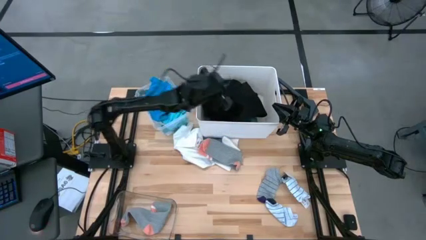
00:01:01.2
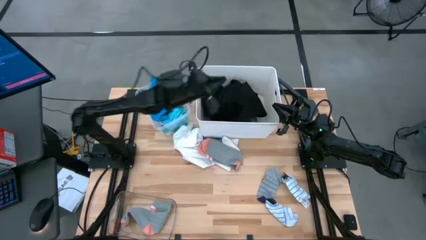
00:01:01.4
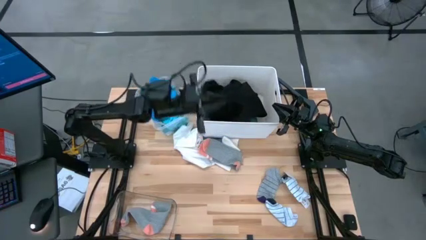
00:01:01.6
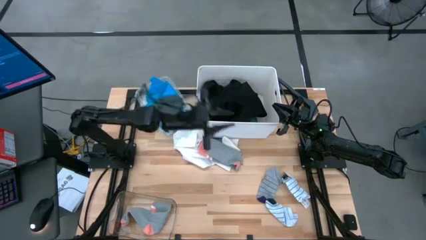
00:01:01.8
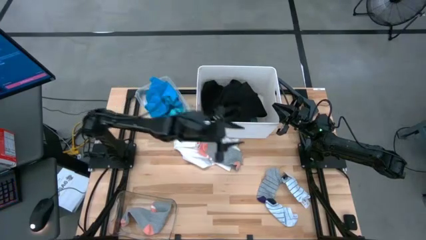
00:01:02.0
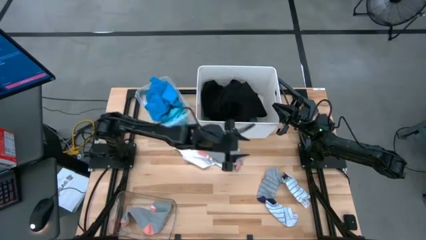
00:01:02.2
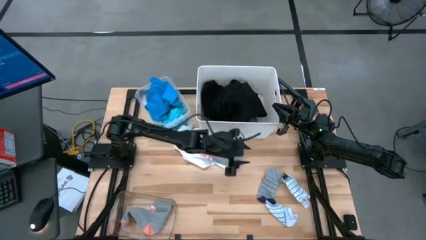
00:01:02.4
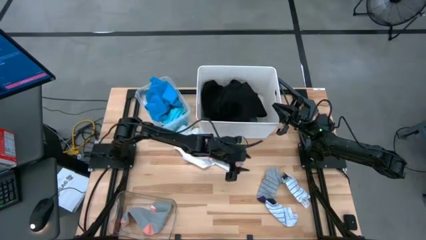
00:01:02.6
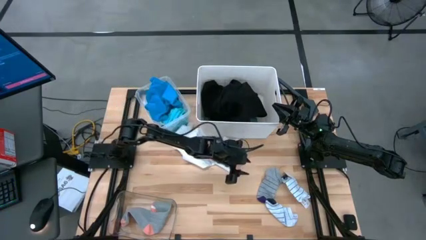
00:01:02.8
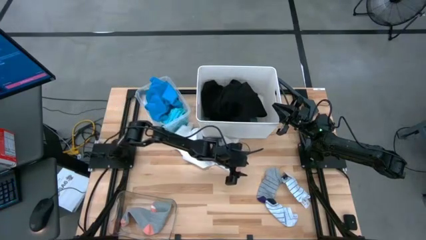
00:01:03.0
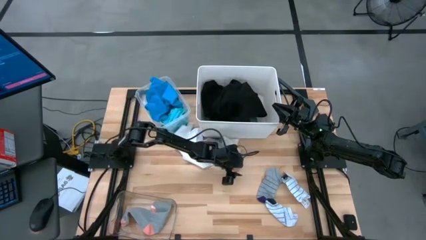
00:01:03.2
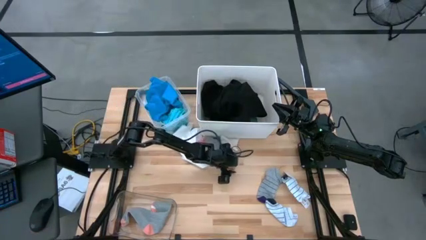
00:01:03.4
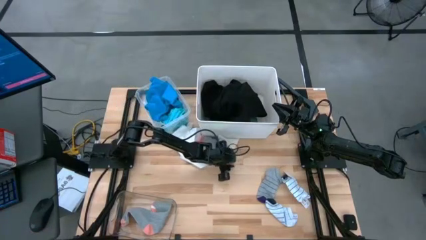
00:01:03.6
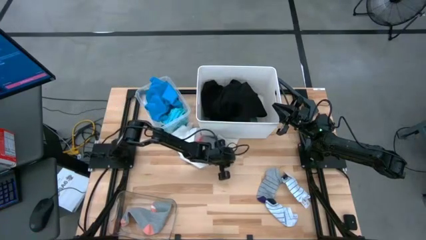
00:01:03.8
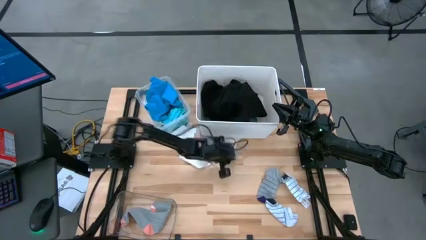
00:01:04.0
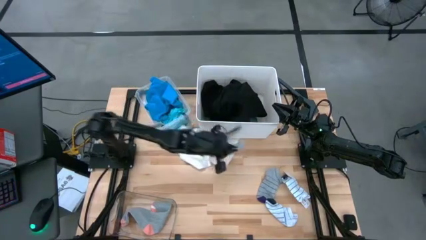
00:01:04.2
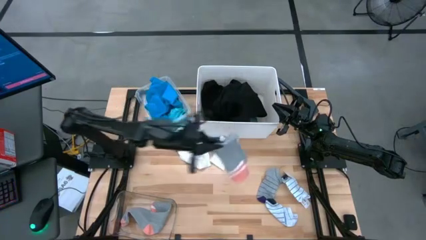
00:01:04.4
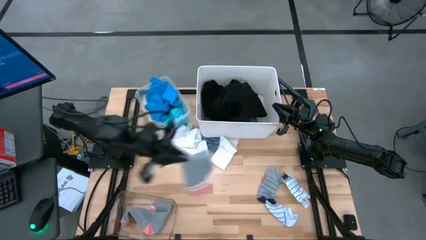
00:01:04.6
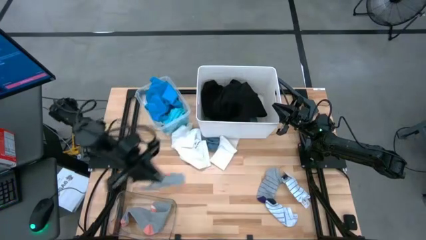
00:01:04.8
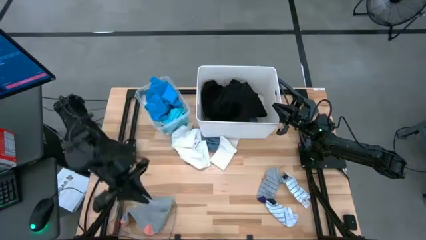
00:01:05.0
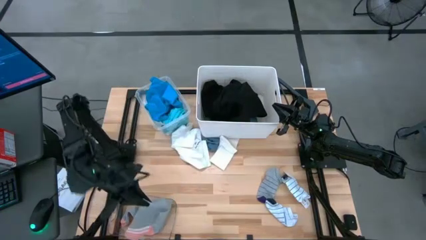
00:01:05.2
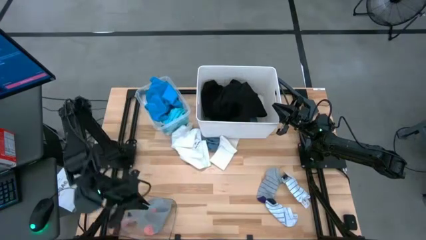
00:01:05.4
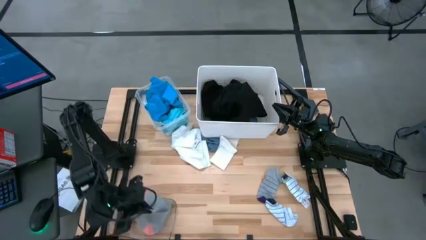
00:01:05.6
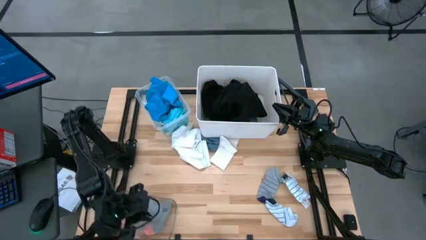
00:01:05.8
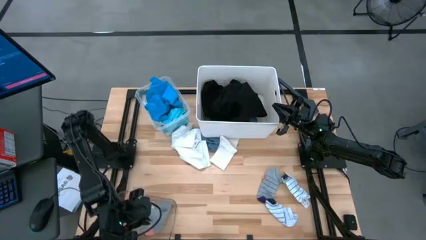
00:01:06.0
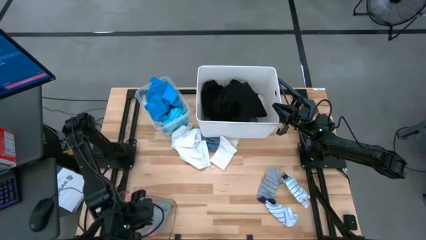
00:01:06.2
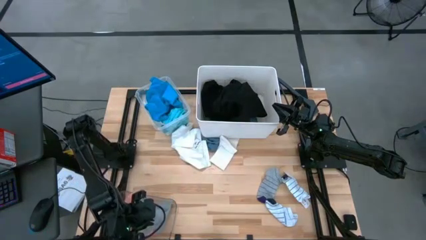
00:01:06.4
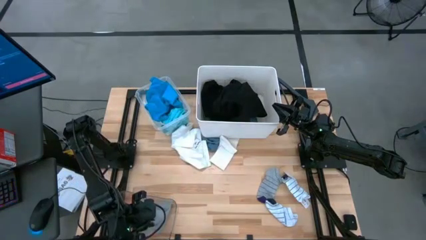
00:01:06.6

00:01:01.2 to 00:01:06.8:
Task: Pick & Place Cloths
Put the gray and pink sock into the transparent bin

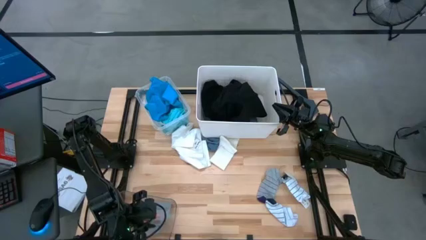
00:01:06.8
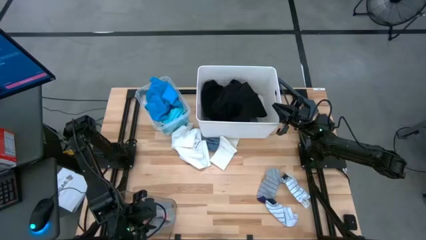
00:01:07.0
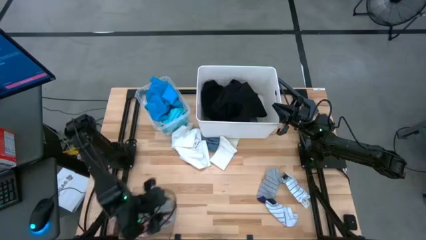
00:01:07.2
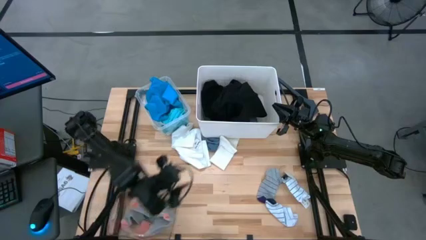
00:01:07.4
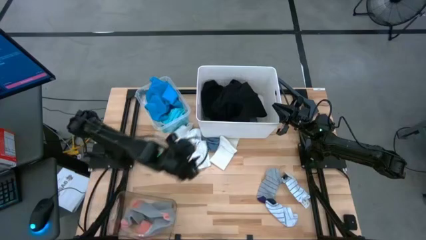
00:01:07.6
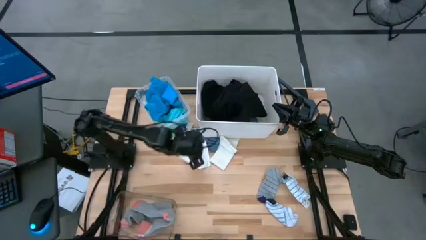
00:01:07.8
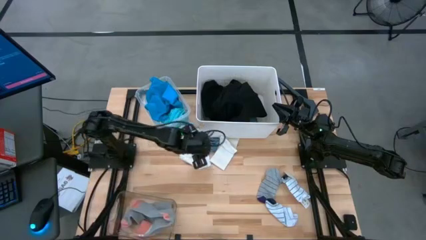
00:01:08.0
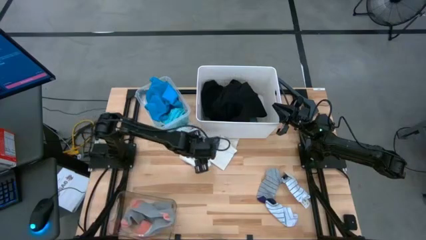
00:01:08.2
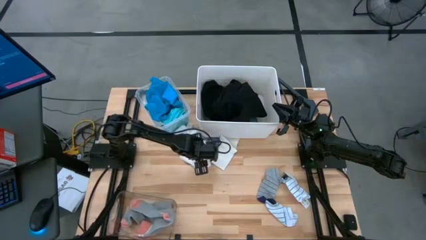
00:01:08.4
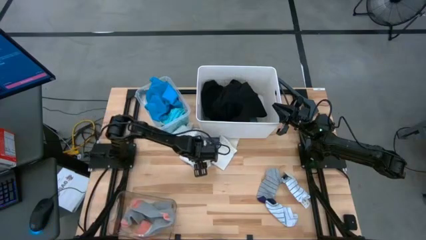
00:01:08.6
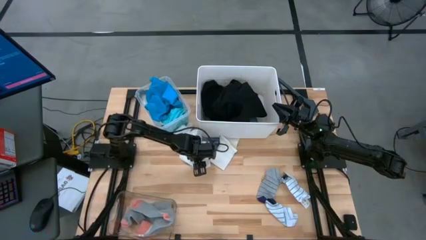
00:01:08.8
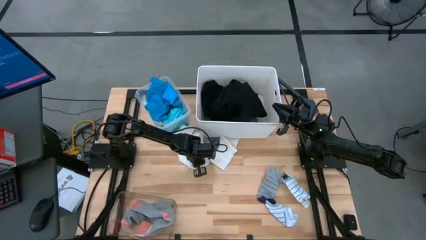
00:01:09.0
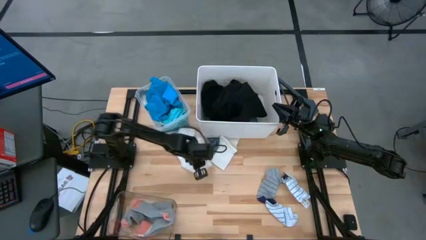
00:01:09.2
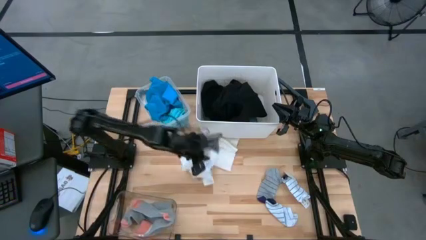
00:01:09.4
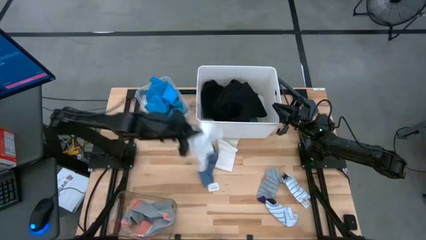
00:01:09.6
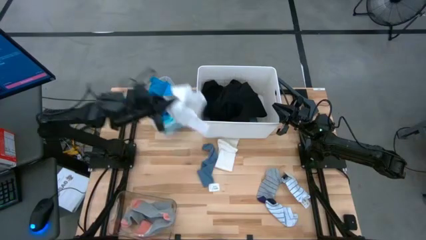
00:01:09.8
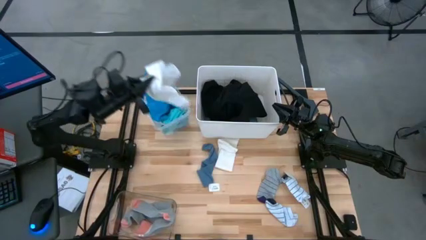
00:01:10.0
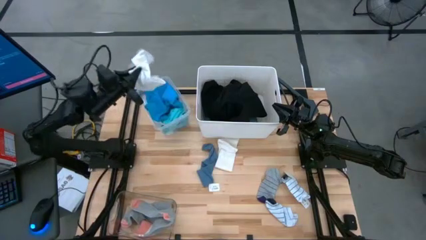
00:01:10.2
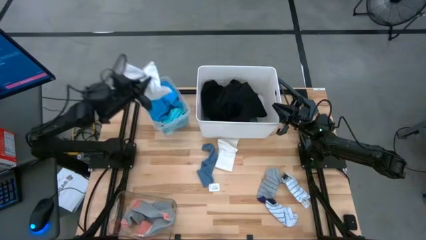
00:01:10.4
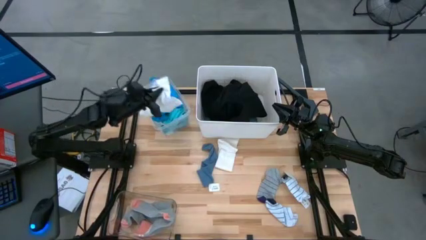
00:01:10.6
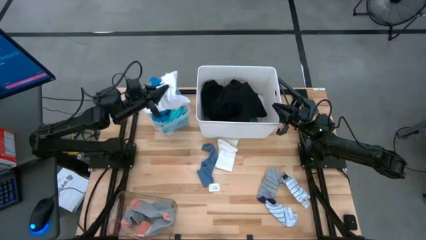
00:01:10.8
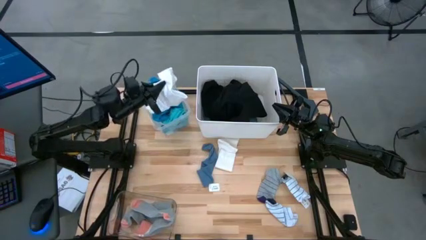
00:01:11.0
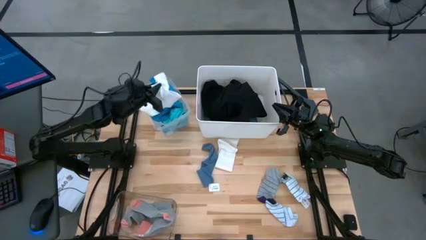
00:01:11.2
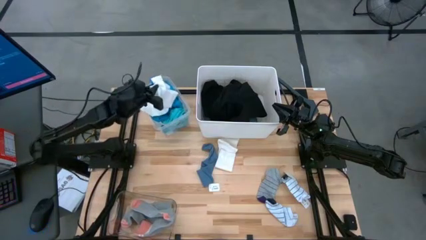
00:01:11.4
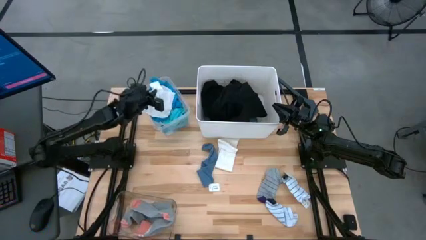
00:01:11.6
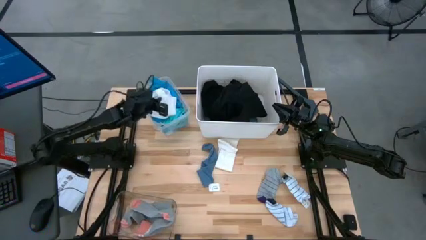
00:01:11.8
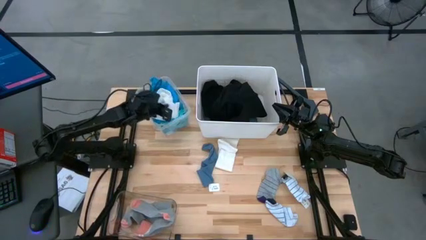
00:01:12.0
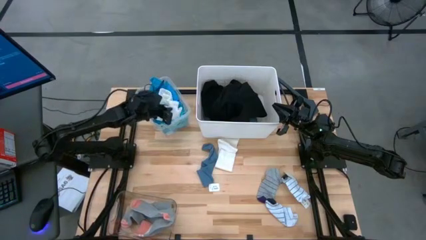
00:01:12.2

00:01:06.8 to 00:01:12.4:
Put the white underwear into the transparent container

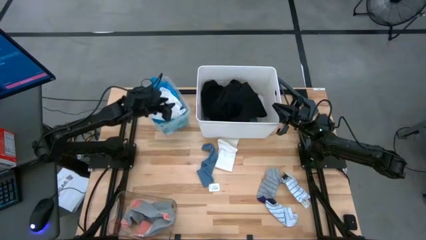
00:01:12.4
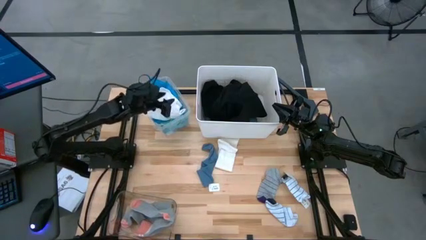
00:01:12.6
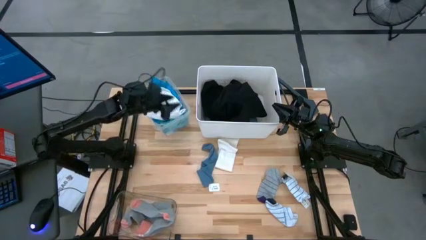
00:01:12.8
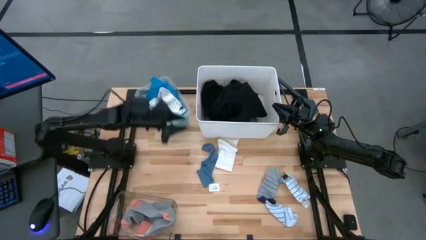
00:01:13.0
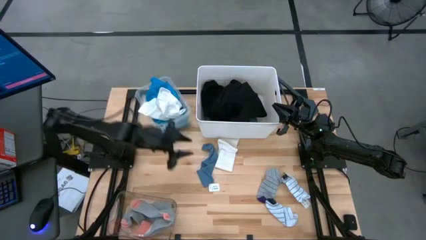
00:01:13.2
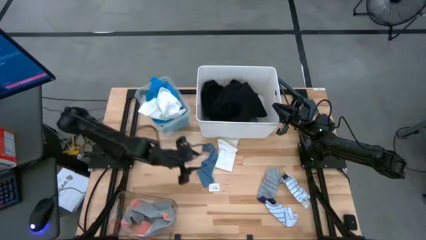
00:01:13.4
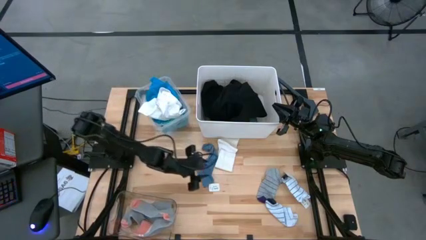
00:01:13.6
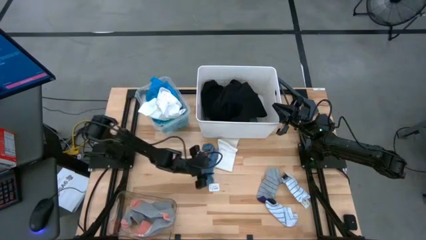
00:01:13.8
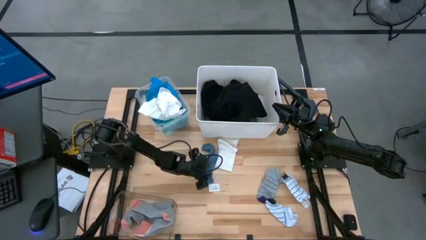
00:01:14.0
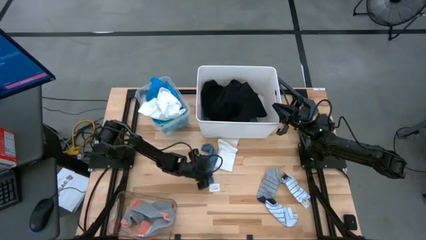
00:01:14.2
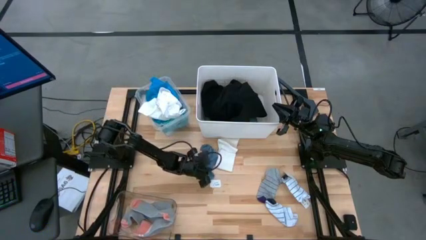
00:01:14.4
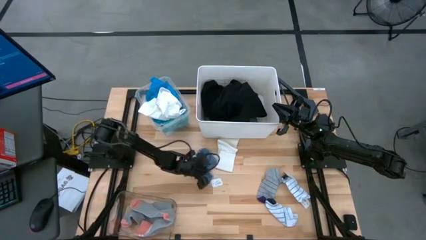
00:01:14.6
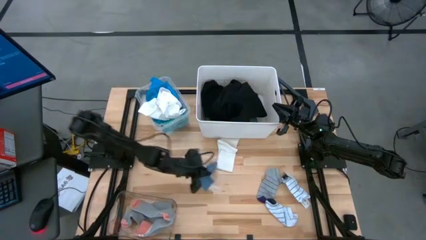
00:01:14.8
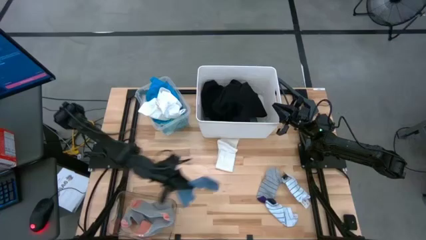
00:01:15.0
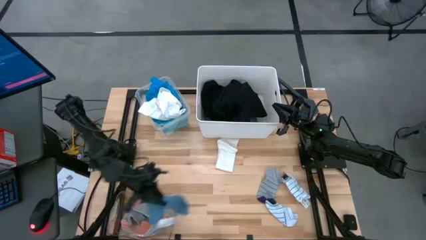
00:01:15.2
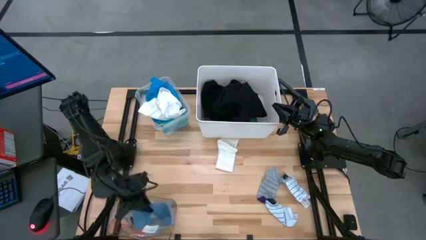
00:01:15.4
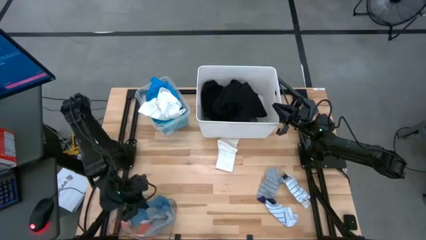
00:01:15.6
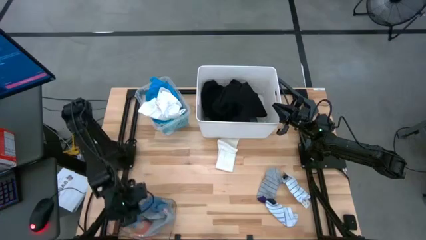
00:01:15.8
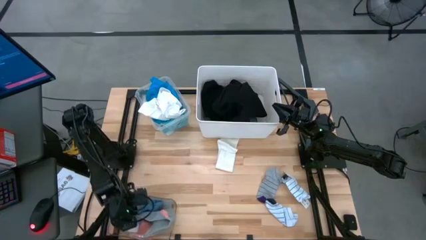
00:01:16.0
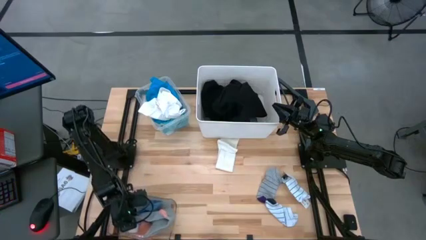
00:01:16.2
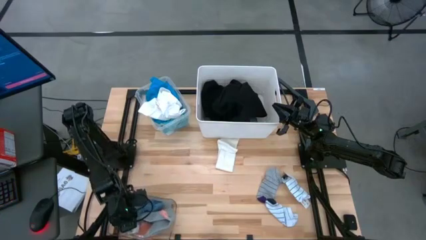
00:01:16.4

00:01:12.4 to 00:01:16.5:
Put the blue sock into the transparent bin
